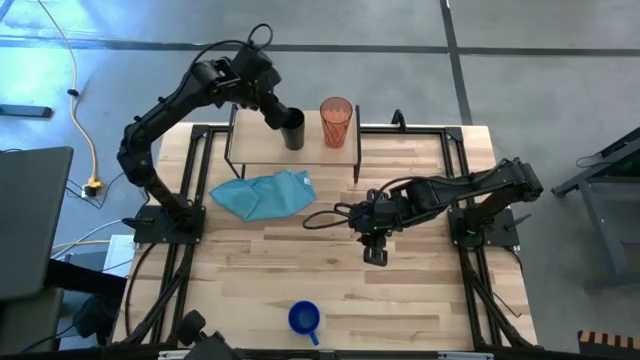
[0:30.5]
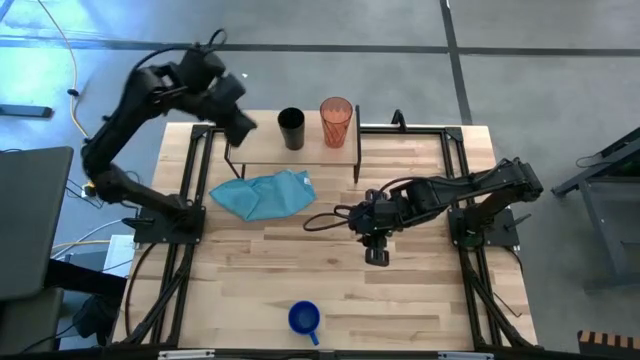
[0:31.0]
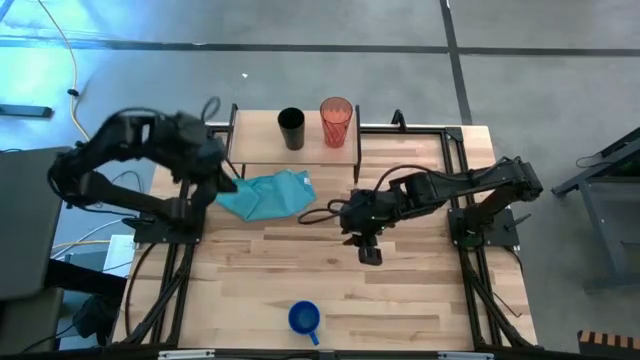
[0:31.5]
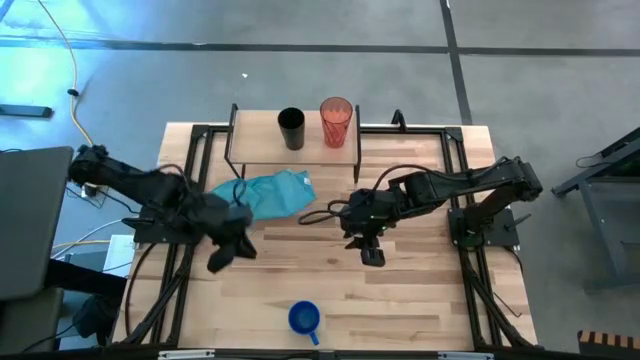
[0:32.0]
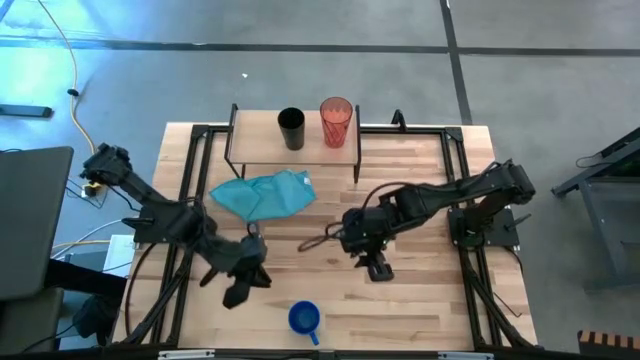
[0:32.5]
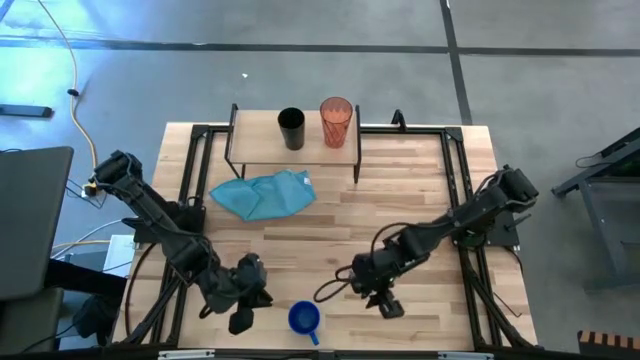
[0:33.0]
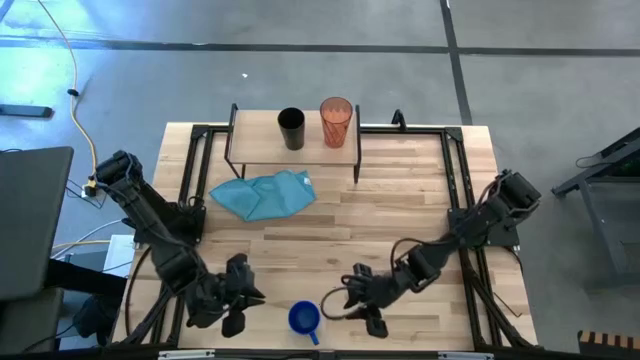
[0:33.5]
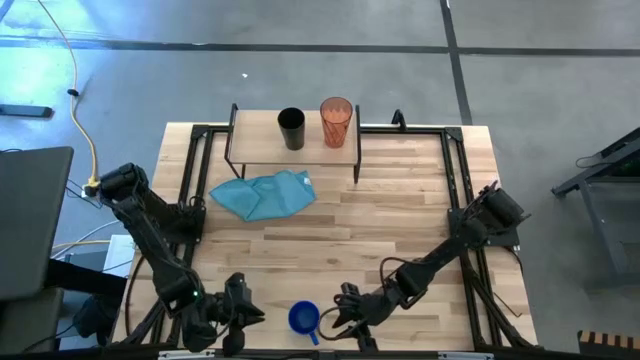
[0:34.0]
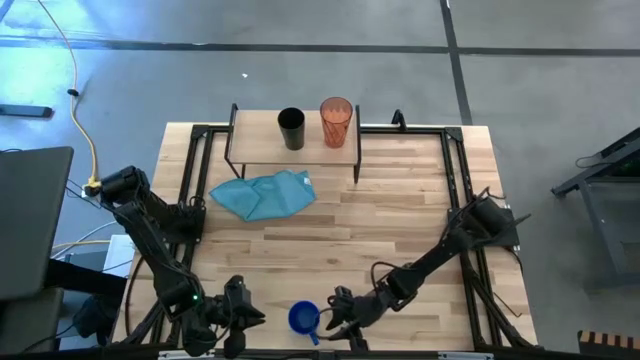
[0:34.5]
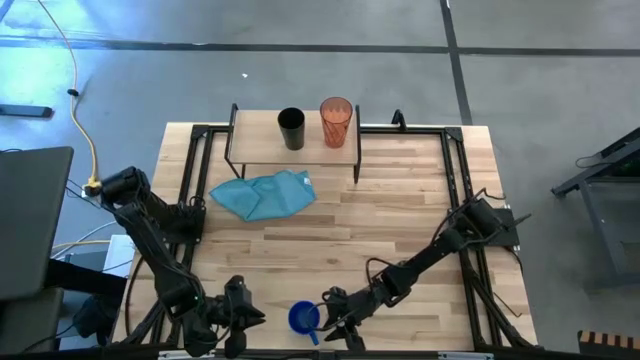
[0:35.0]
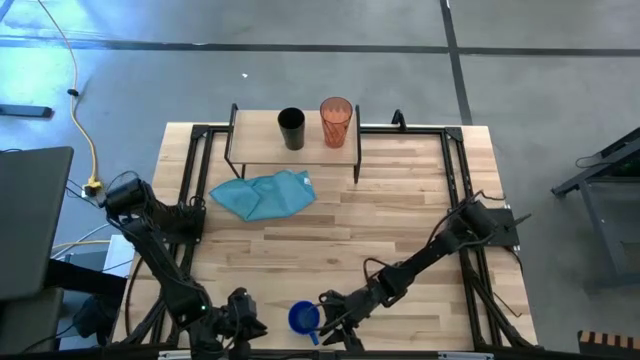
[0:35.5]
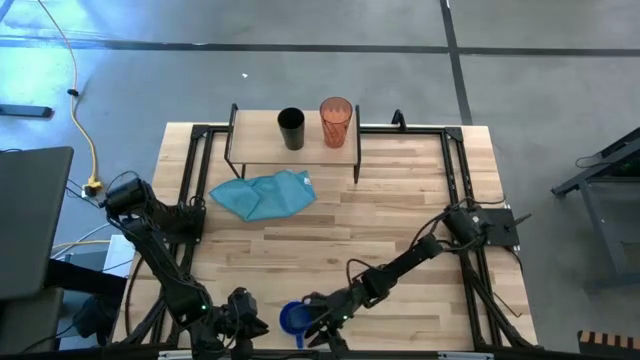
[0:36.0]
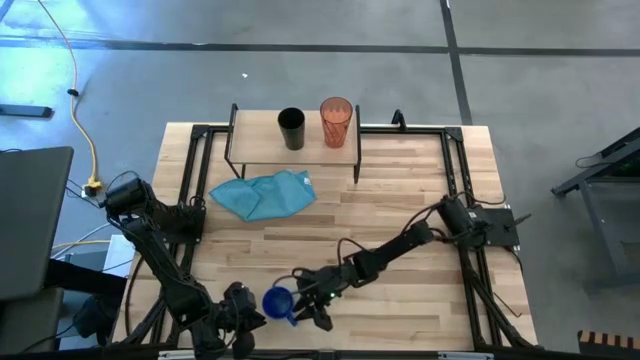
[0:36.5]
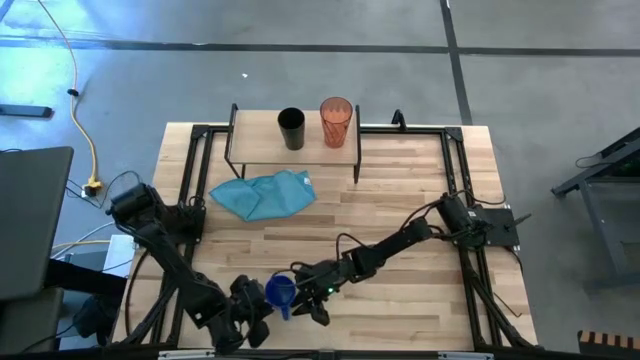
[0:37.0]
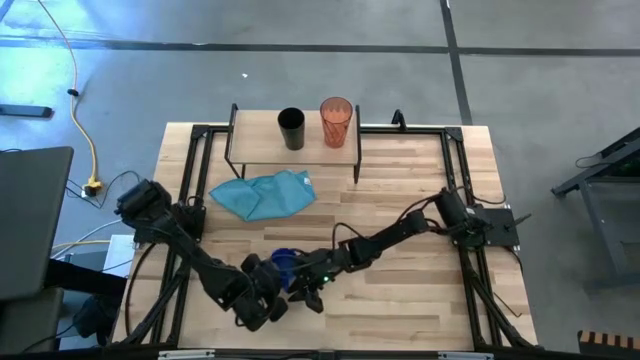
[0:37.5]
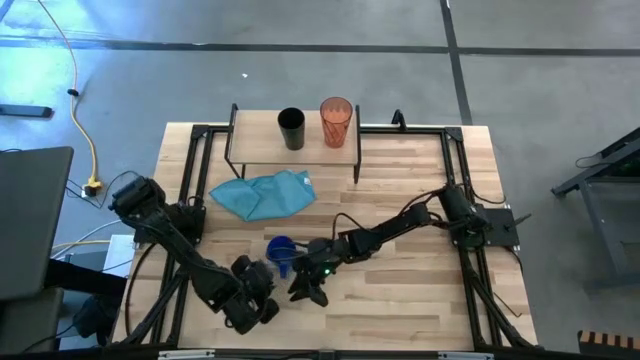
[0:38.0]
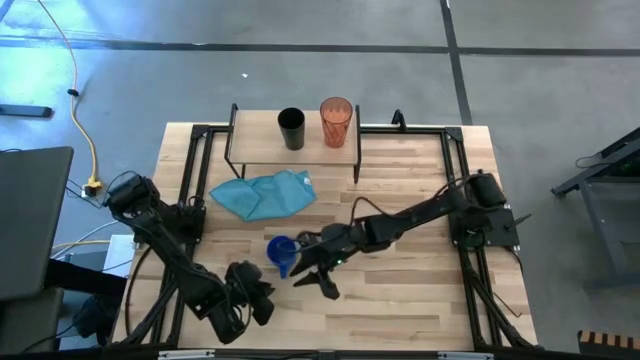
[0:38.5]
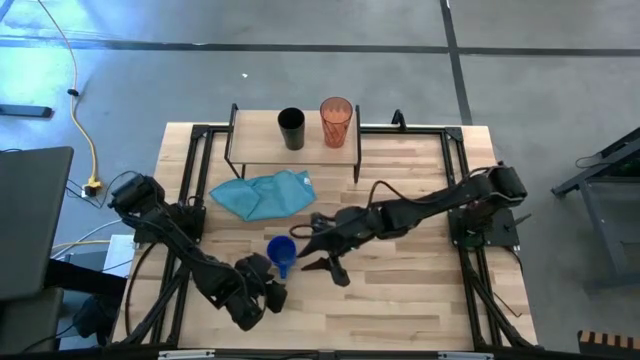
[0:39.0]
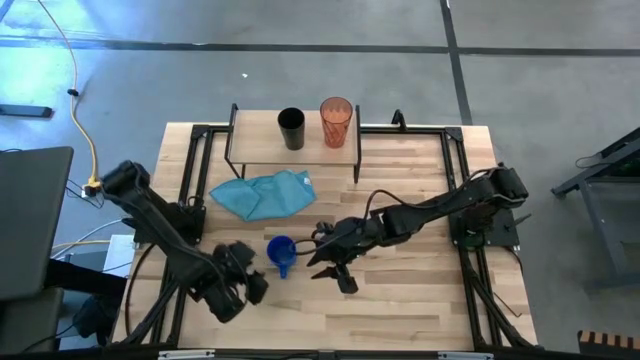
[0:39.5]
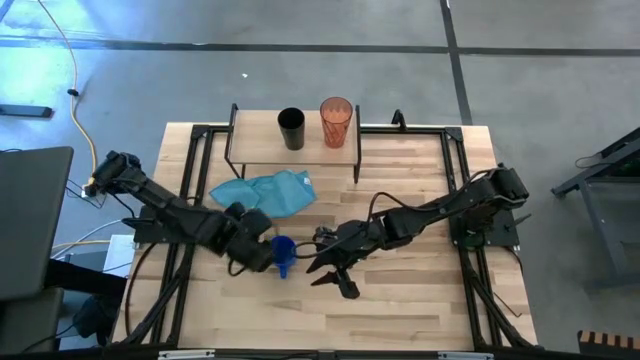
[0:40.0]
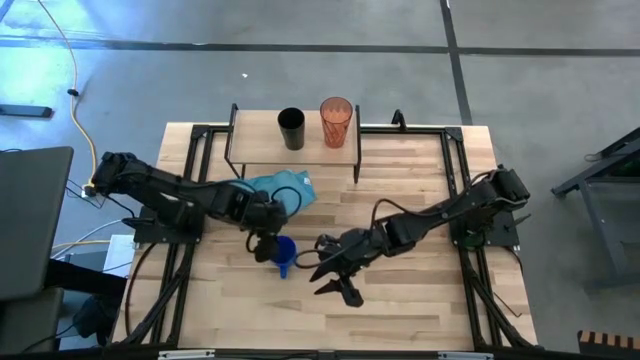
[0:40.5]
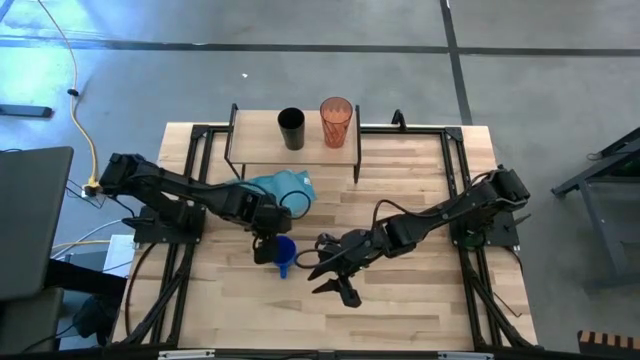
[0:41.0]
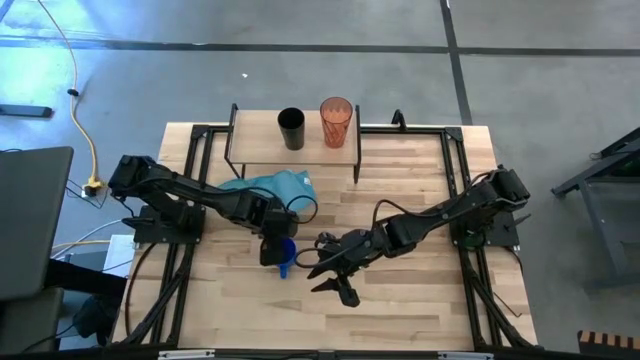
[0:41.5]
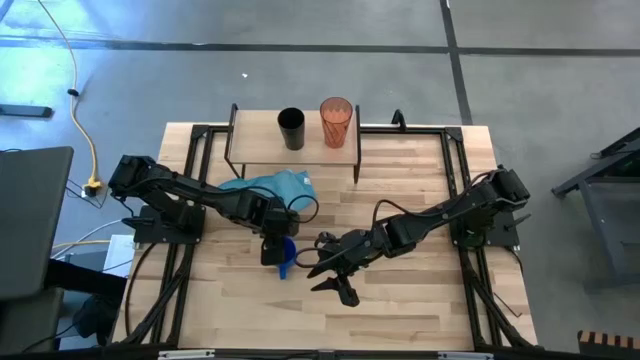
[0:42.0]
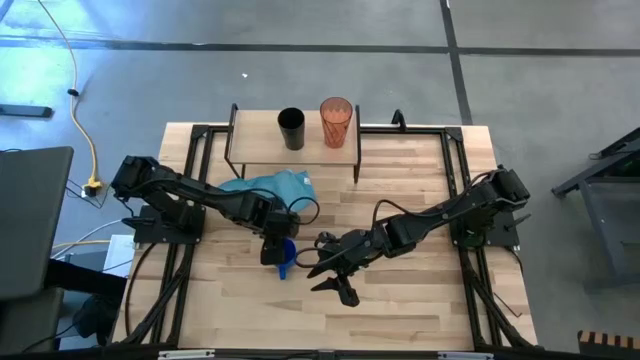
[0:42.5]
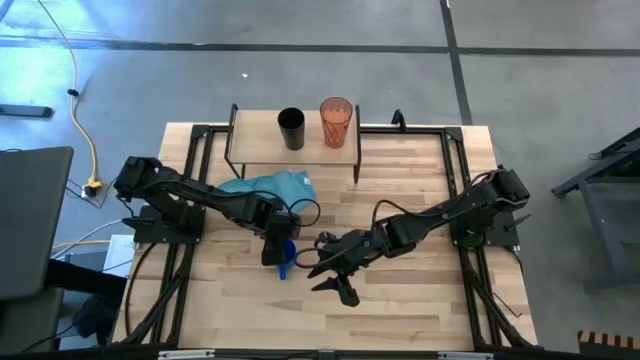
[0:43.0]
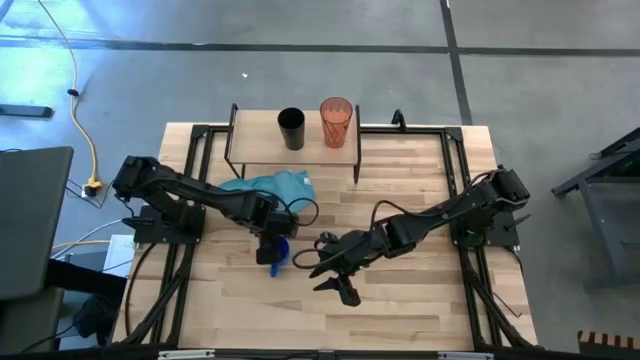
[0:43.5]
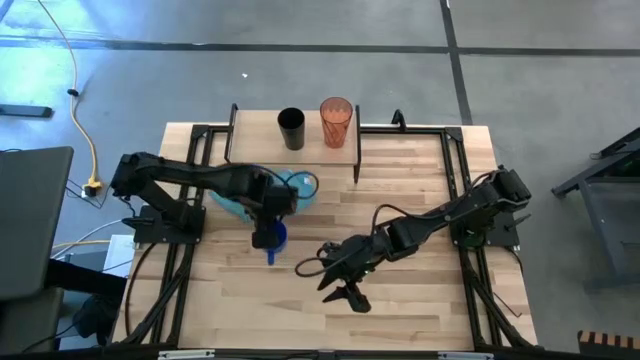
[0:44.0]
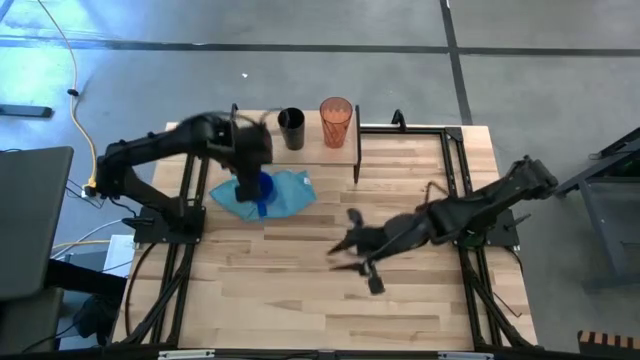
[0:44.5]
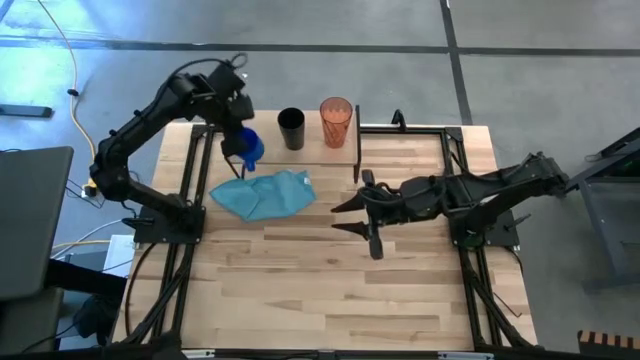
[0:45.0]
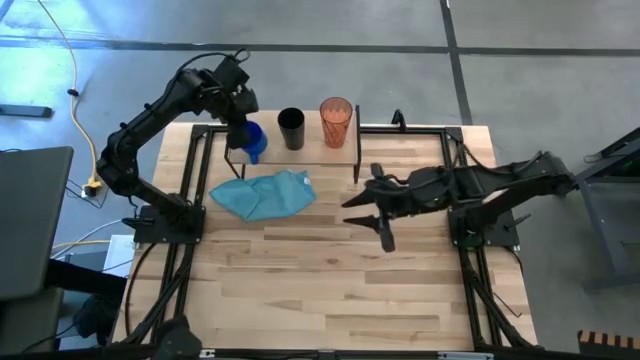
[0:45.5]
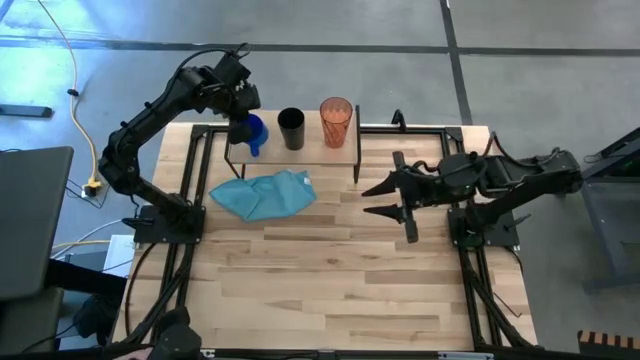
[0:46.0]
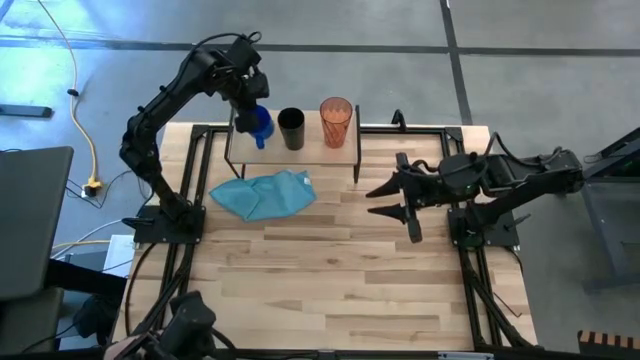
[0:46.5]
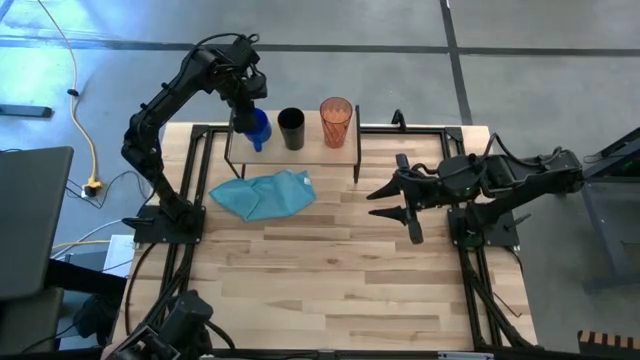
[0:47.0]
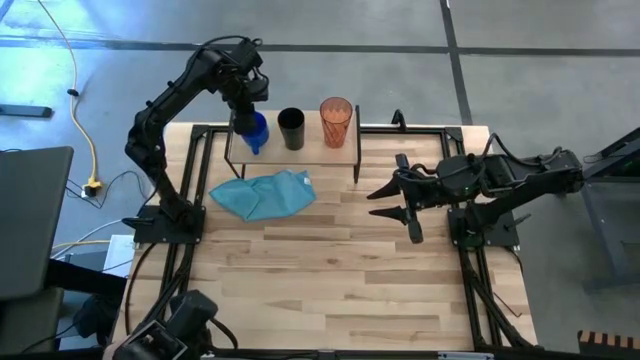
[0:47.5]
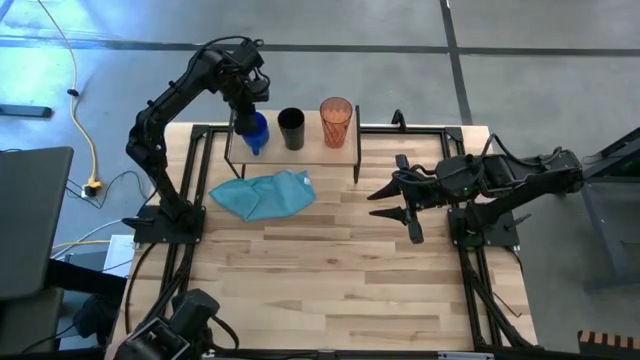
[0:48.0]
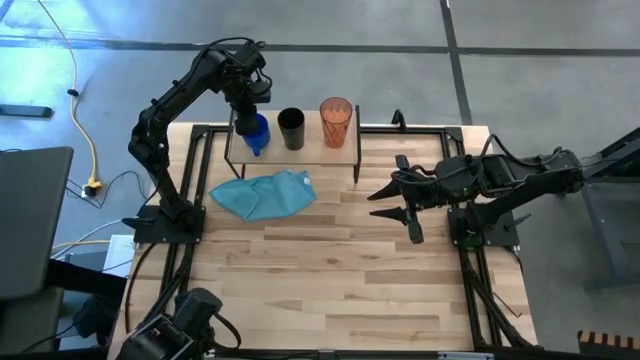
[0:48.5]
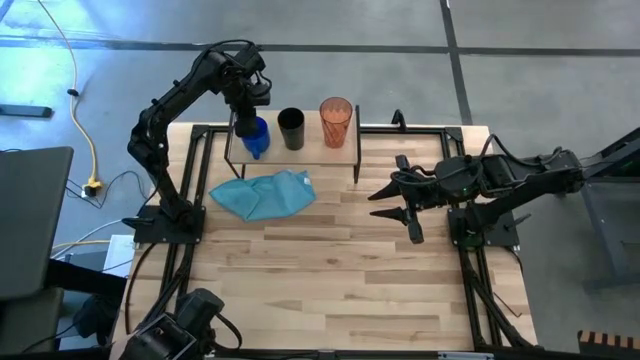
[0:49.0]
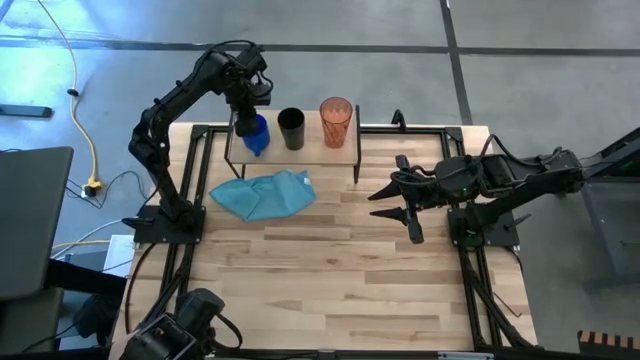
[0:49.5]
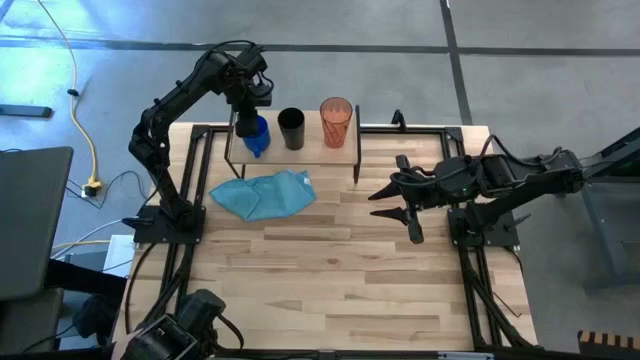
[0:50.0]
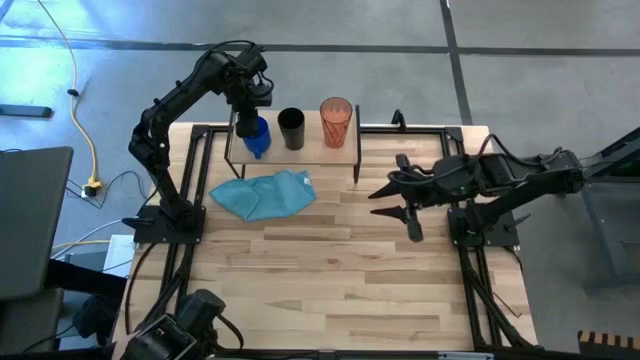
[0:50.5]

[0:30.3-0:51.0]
Task: Stack small to large cups/mugs on shelf
Put the blue cup on the shelf
